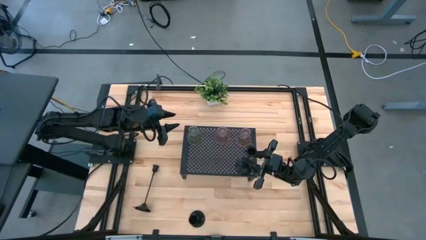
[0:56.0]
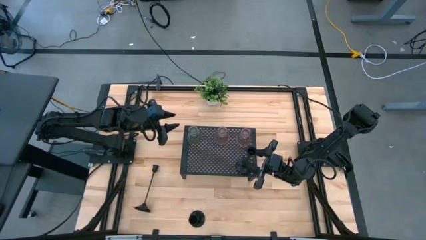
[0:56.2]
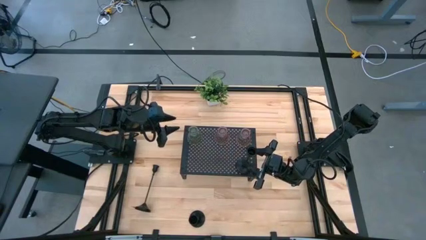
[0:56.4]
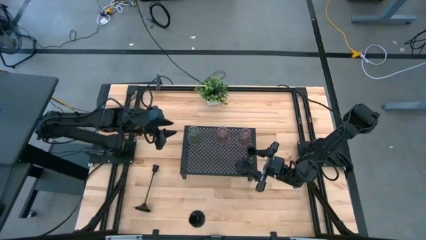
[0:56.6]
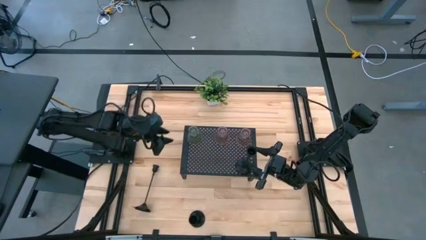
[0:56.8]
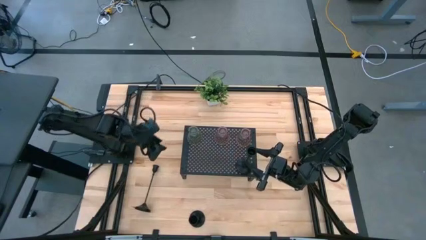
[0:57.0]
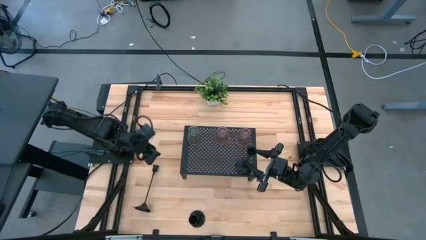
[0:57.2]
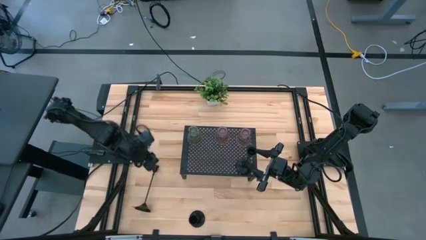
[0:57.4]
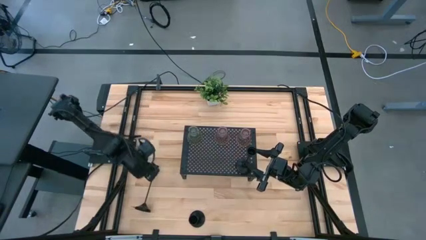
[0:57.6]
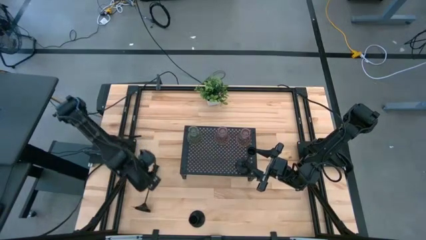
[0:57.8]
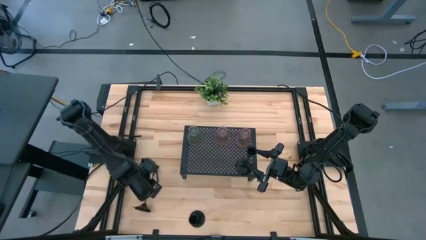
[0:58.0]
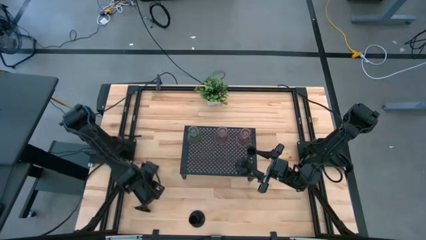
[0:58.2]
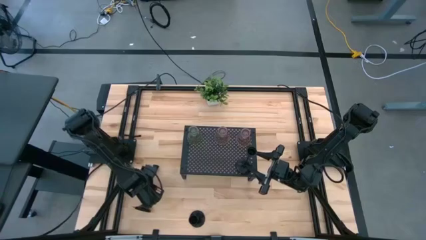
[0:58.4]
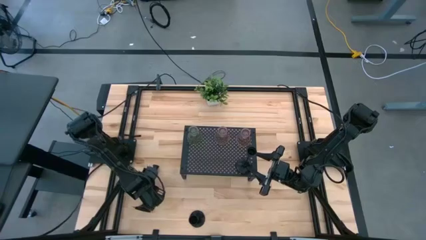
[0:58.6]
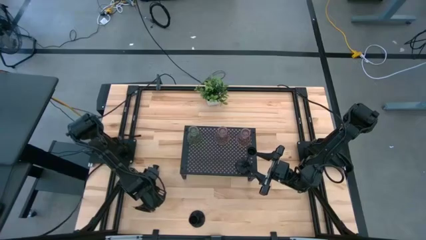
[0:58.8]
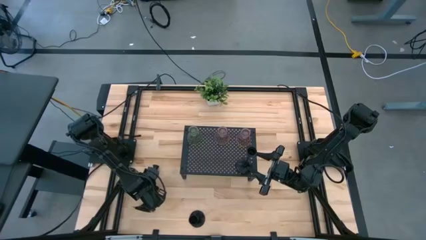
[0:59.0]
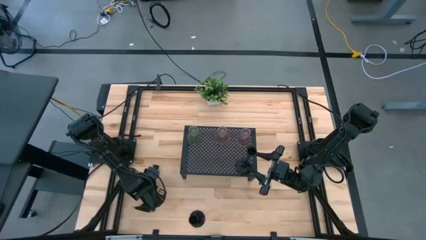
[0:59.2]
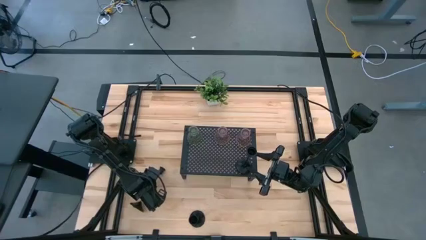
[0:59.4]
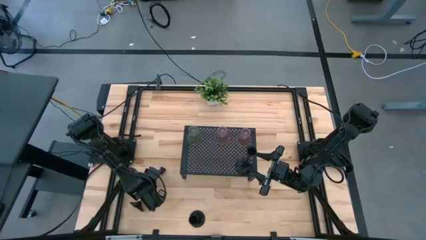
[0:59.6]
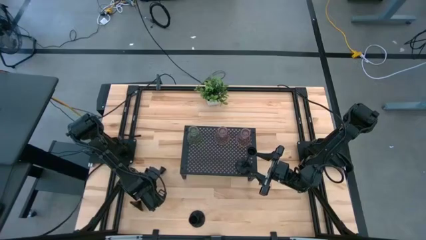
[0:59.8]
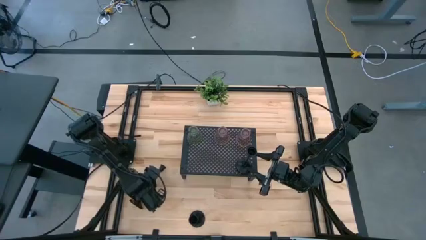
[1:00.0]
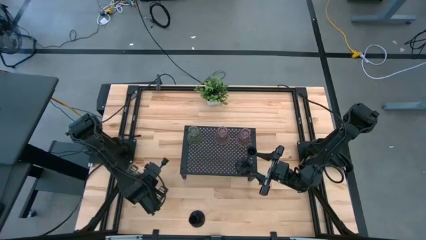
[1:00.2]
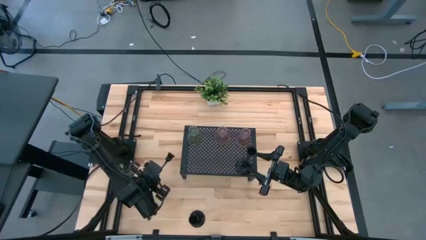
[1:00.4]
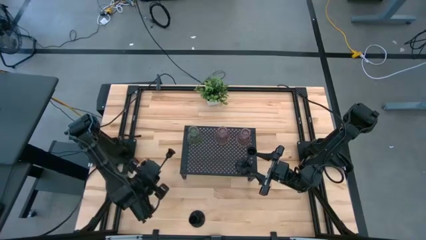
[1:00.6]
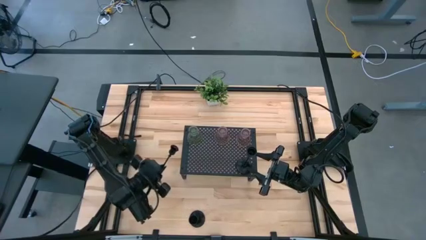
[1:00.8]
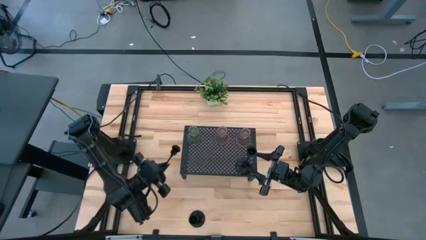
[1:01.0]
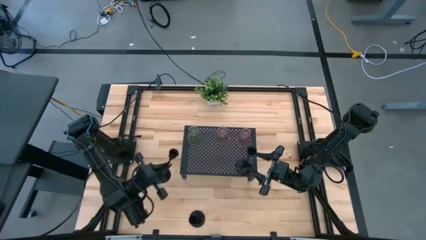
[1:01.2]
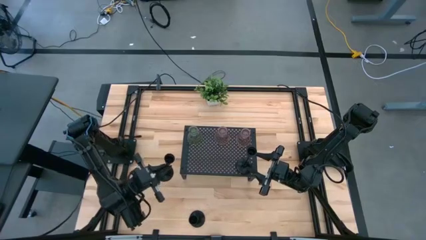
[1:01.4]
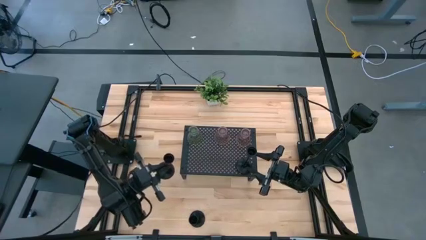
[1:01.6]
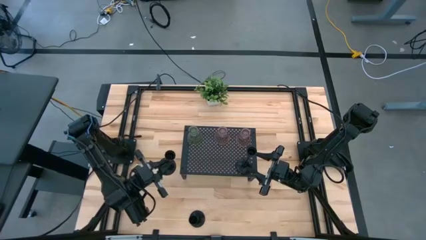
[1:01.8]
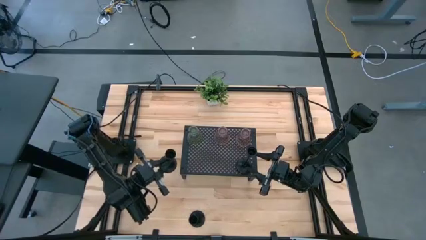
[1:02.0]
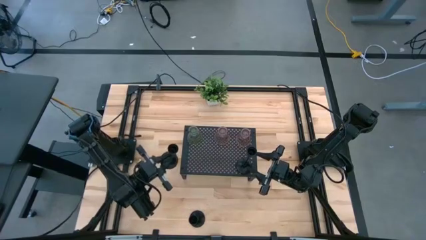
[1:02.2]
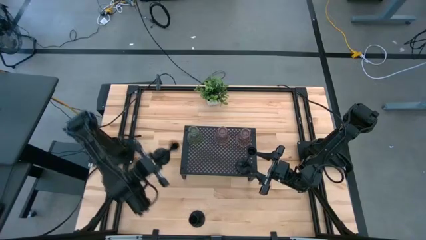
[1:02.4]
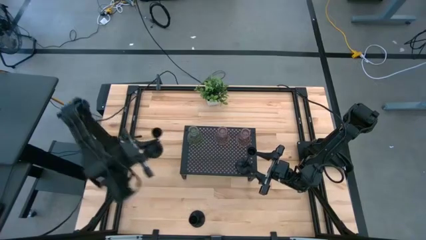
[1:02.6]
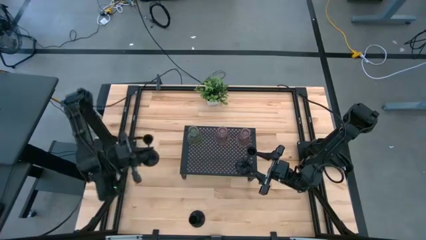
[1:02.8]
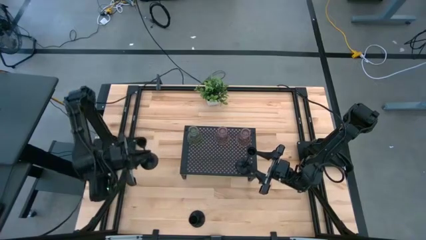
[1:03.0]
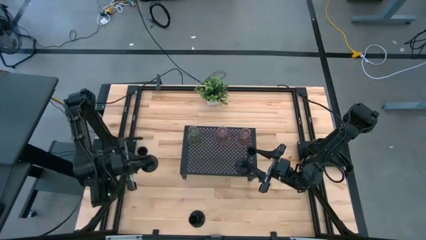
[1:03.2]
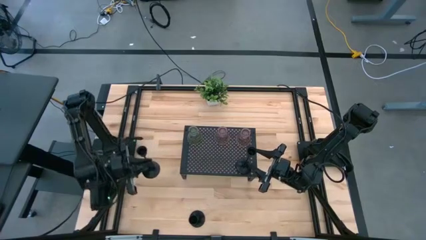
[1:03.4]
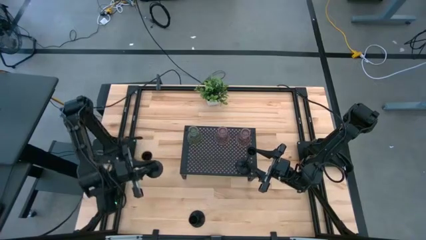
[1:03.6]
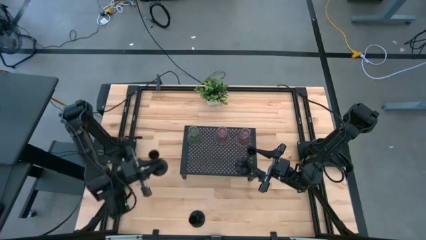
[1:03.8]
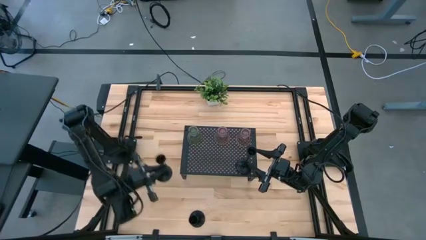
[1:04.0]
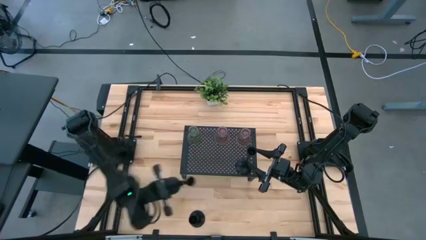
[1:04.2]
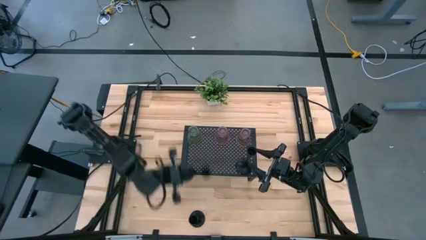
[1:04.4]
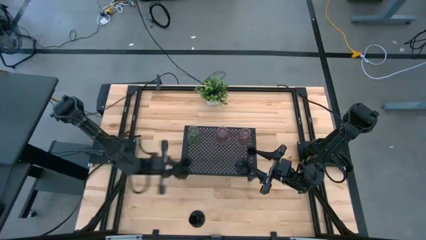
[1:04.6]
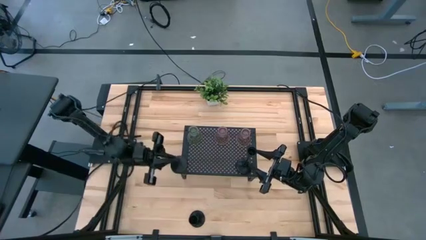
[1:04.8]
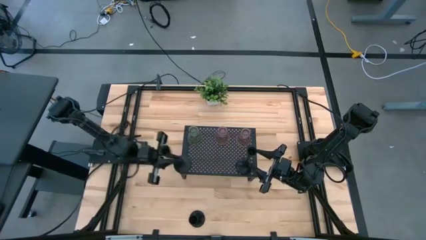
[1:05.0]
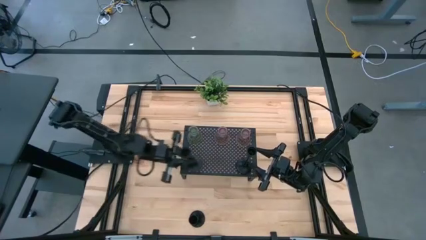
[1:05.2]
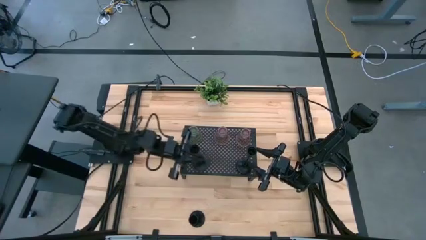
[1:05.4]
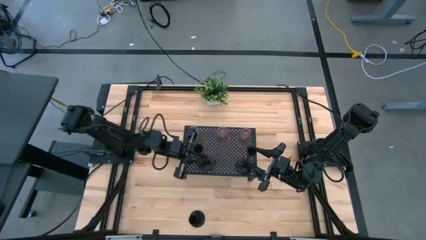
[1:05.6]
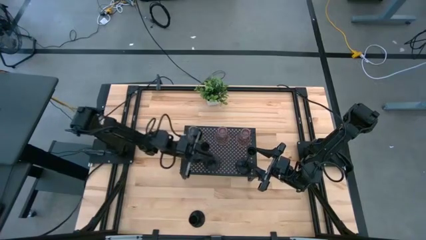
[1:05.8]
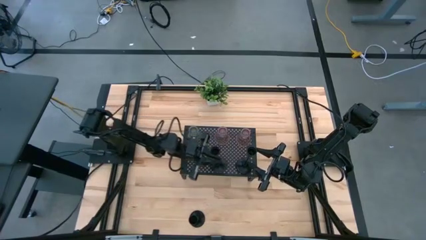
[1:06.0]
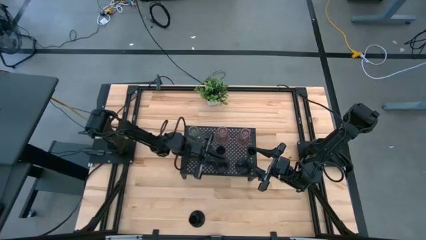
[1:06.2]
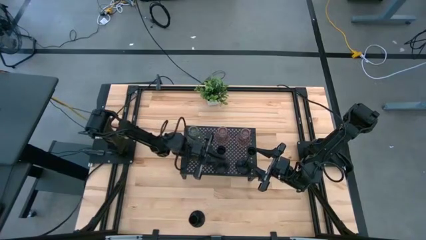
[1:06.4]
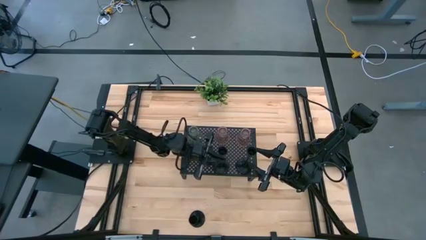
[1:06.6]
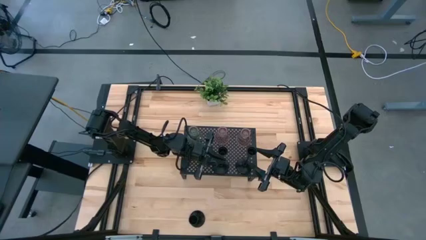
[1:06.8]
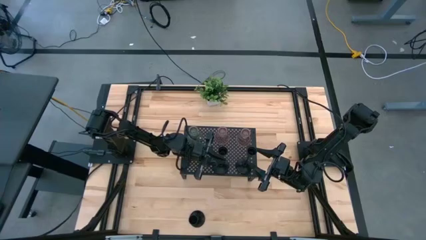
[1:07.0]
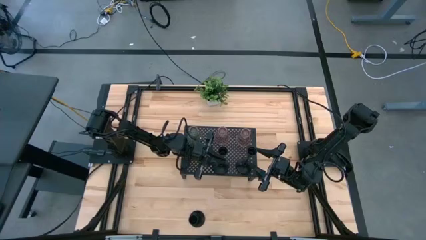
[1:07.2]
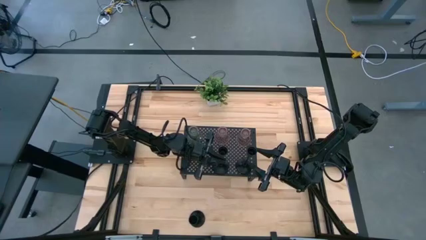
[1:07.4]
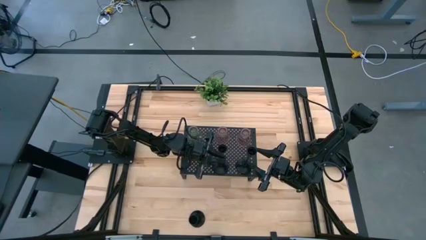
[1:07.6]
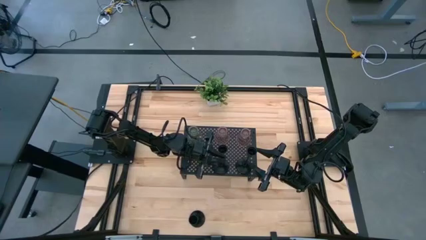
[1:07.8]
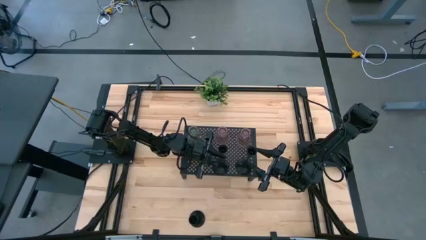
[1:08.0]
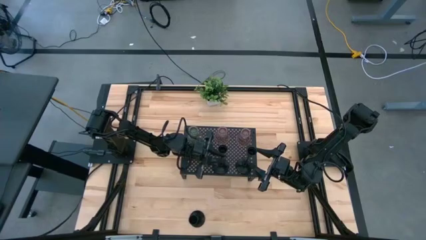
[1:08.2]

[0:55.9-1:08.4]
Task: Pick & Place candle stick holders
Put the left black candle holder on the shelf aligned with the other black candle holder

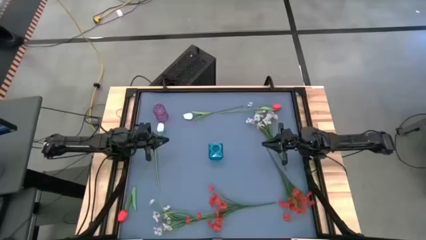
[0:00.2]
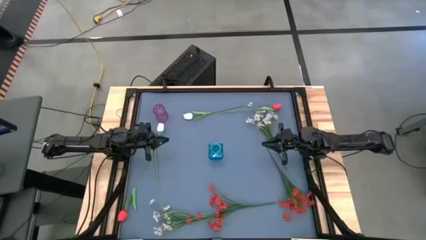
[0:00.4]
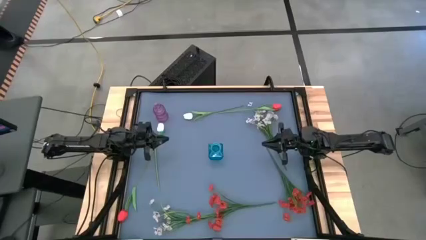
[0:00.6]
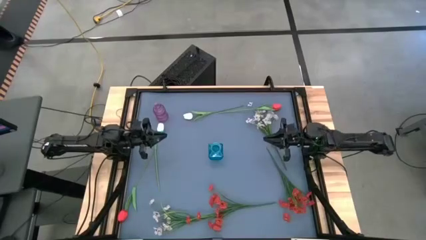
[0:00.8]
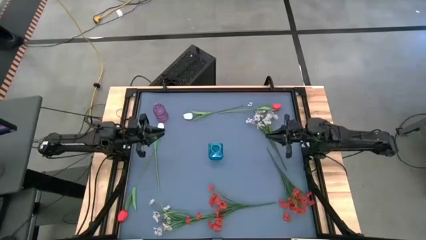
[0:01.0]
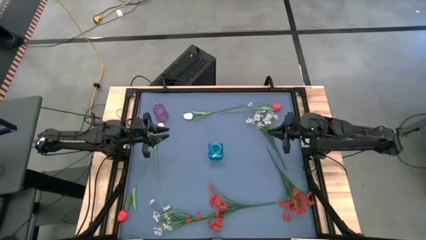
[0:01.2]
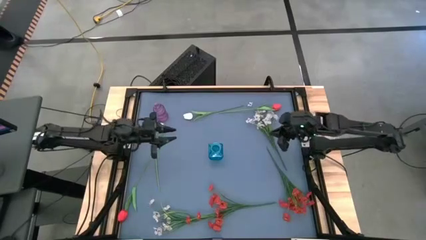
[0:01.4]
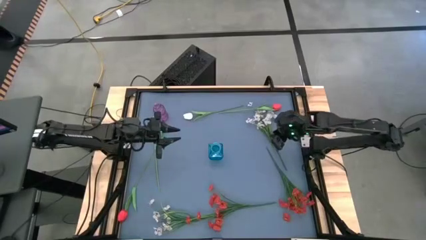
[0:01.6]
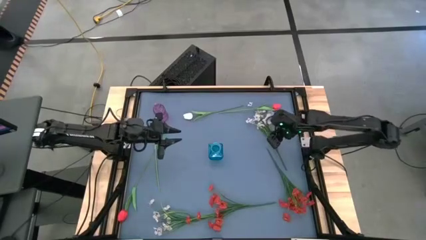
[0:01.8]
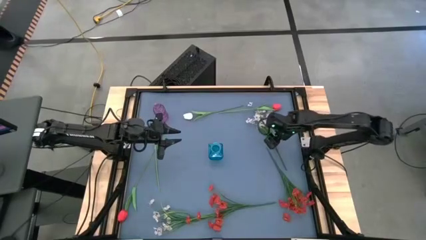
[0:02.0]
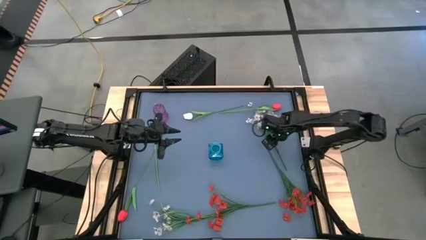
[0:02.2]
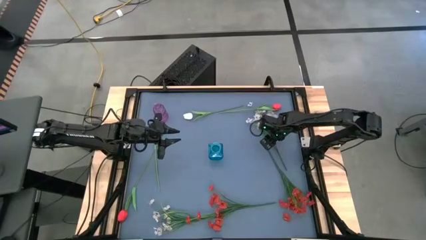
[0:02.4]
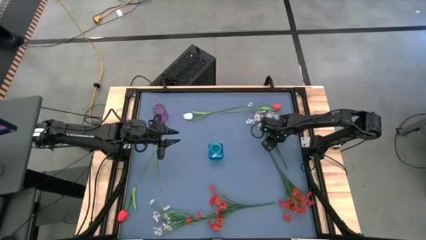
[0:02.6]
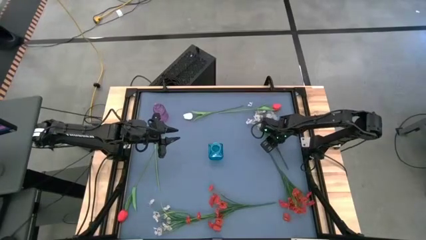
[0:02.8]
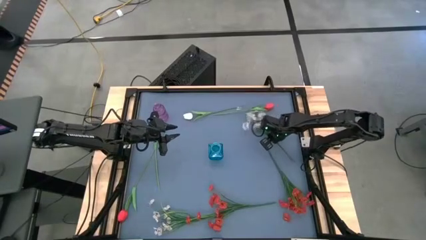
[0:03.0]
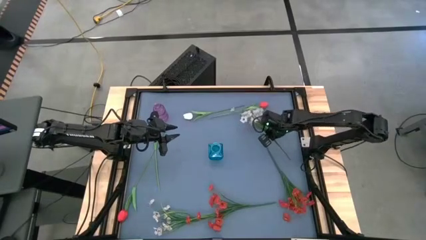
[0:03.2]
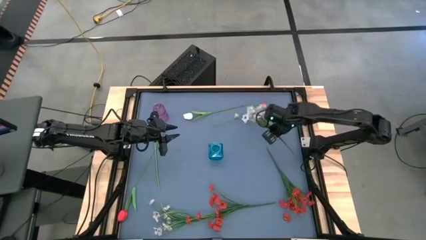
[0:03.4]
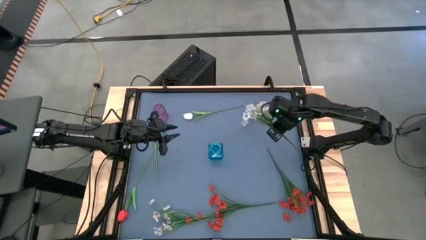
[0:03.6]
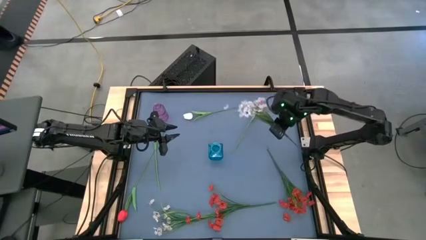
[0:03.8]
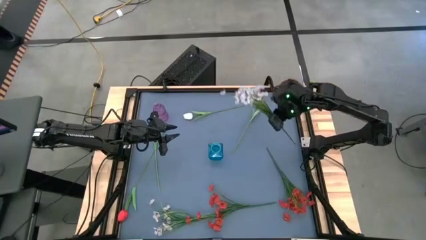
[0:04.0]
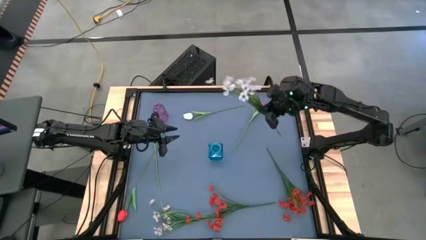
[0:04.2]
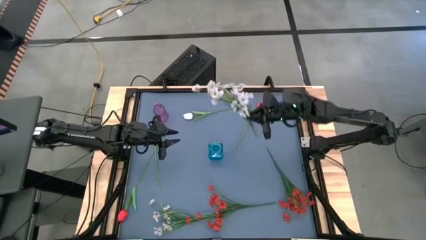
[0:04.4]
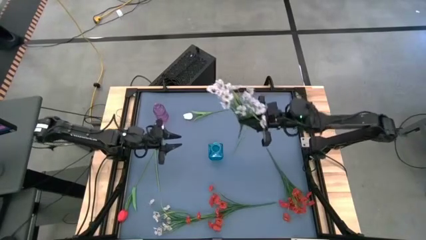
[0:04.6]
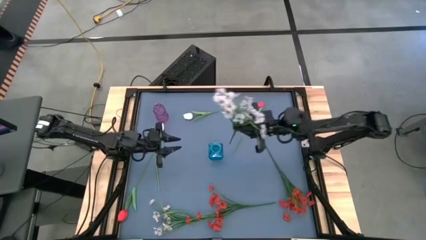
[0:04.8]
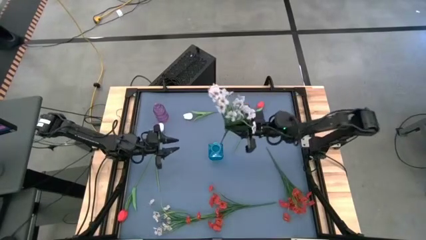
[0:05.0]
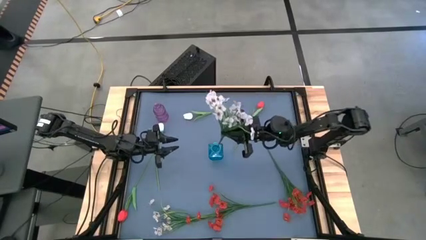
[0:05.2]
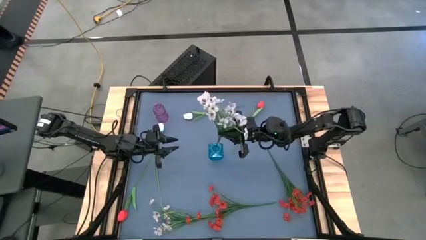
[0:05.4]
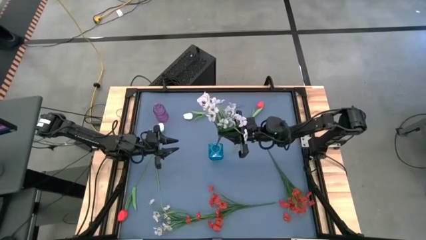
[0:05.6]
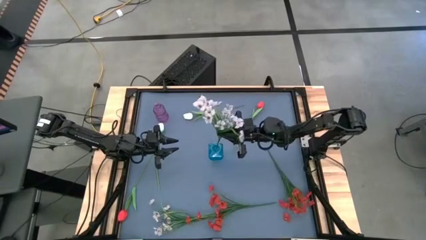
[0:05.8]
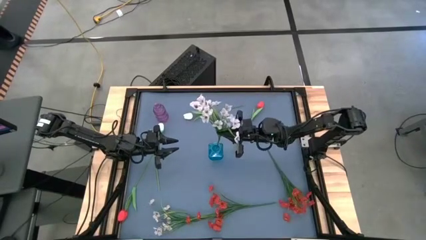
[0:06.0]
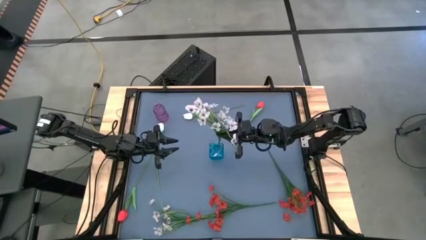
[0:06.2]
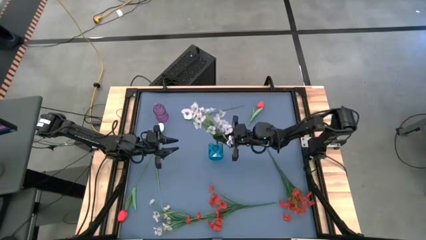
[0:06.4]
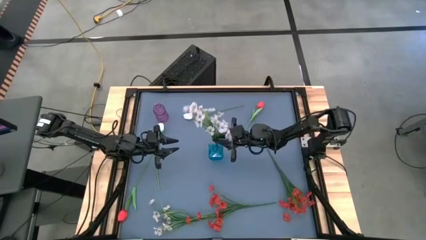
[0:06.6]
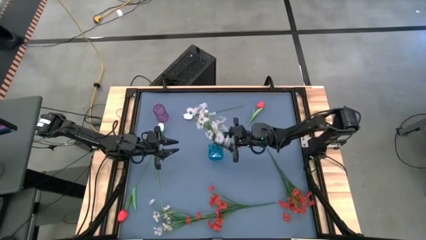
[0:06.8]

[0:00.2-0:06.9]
Task: Sort flowers into vase by color
Put the top white flowers into the blue vase
